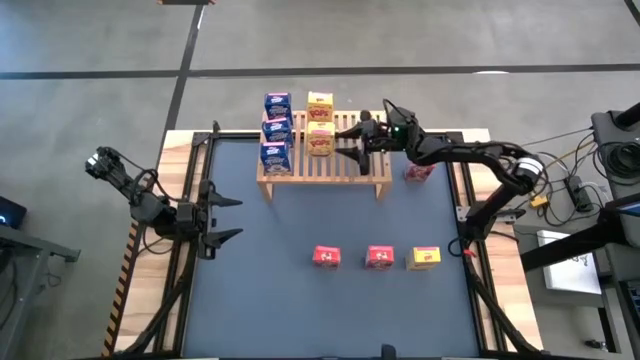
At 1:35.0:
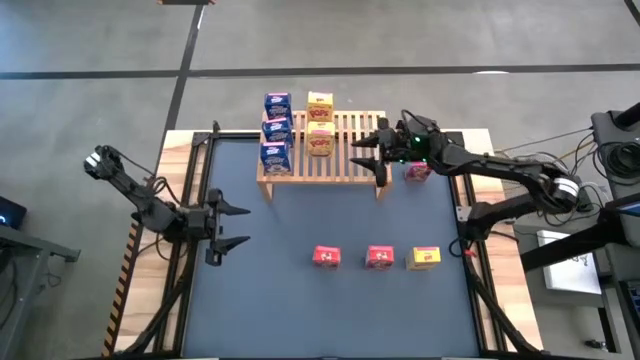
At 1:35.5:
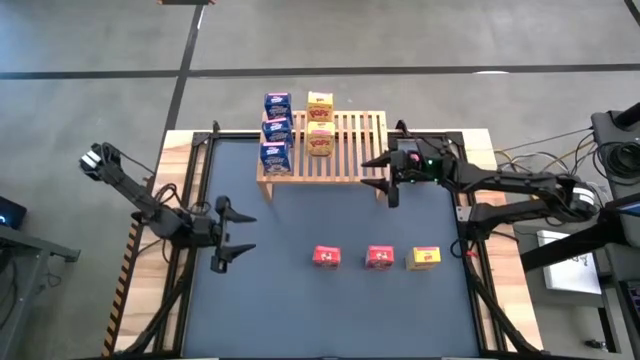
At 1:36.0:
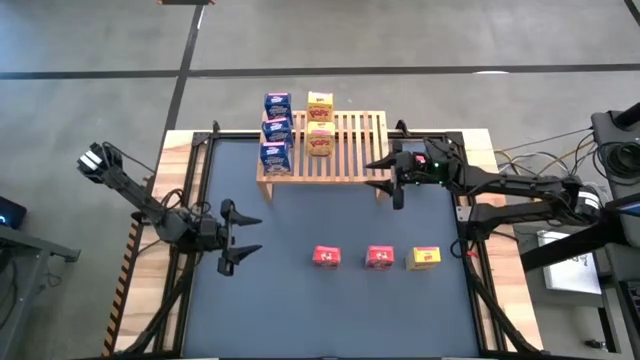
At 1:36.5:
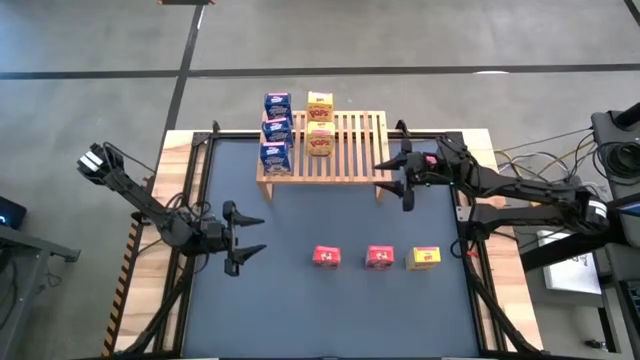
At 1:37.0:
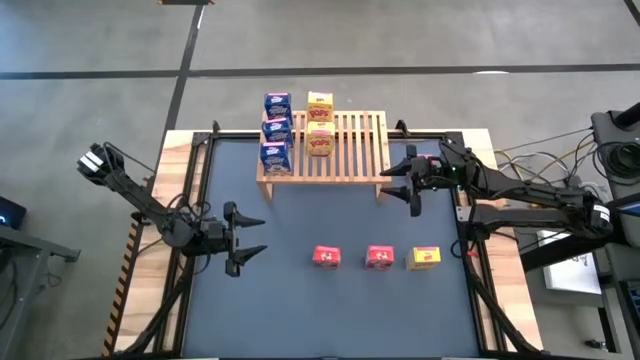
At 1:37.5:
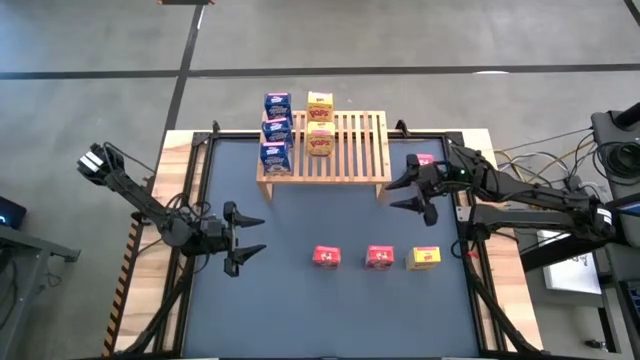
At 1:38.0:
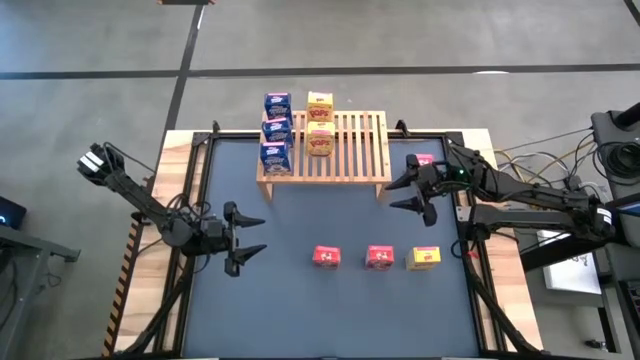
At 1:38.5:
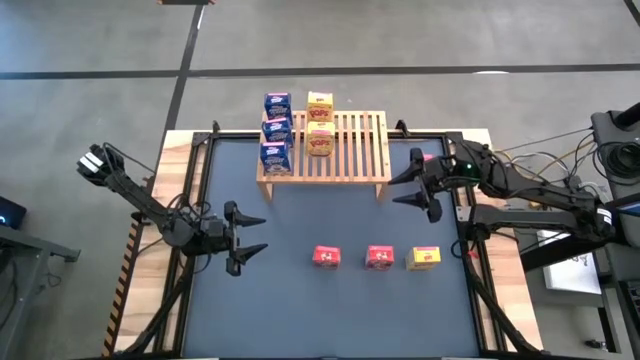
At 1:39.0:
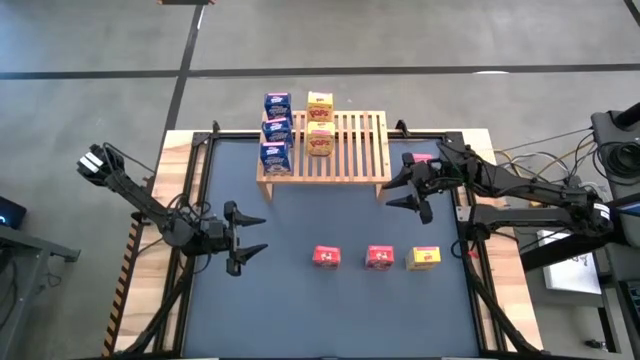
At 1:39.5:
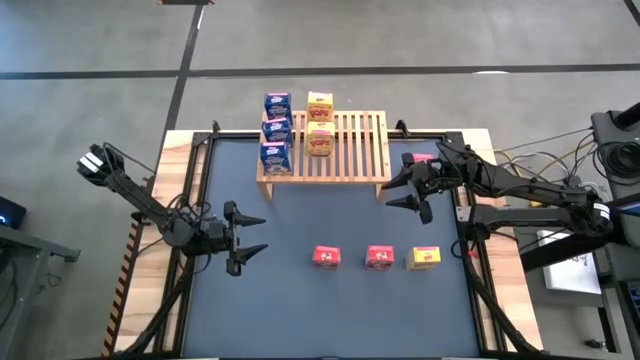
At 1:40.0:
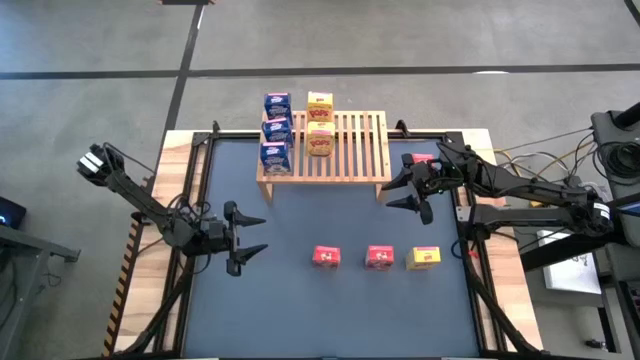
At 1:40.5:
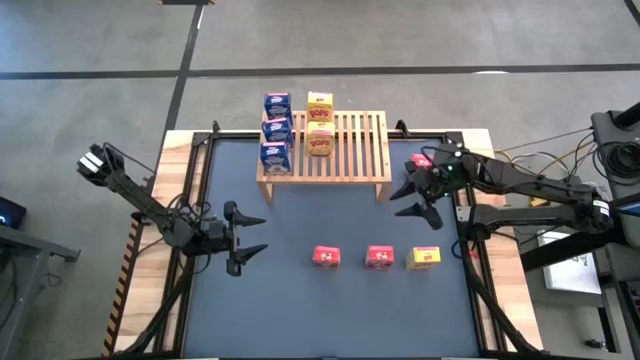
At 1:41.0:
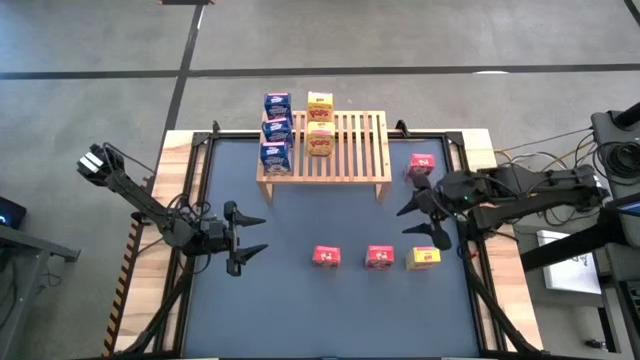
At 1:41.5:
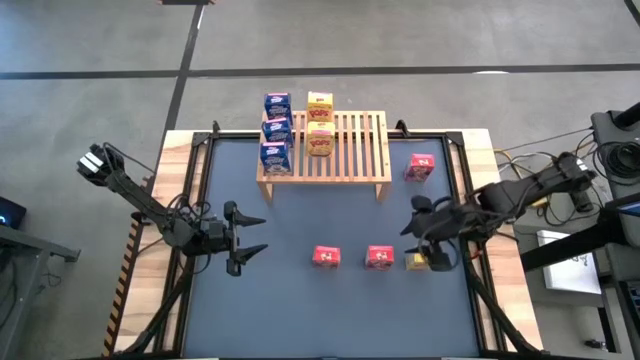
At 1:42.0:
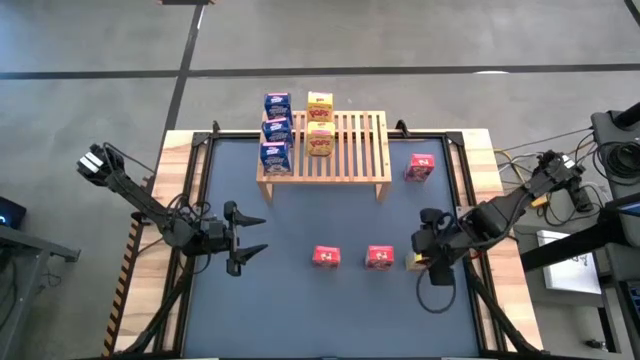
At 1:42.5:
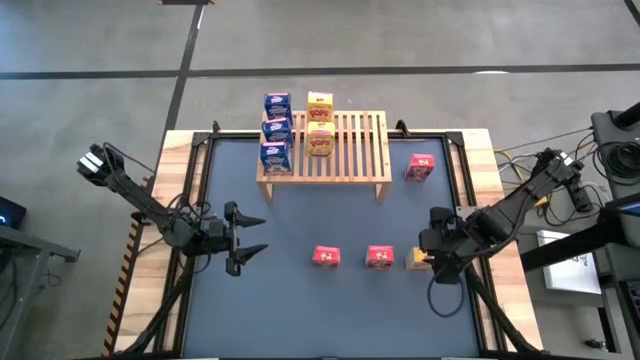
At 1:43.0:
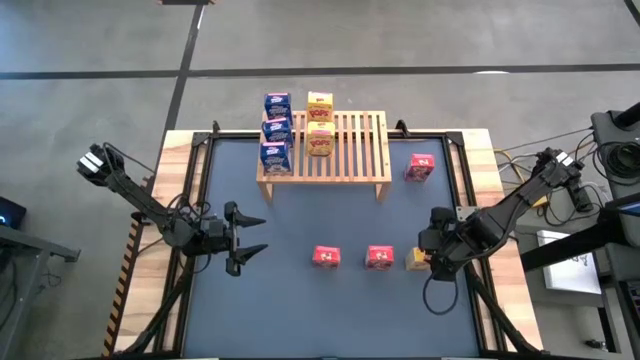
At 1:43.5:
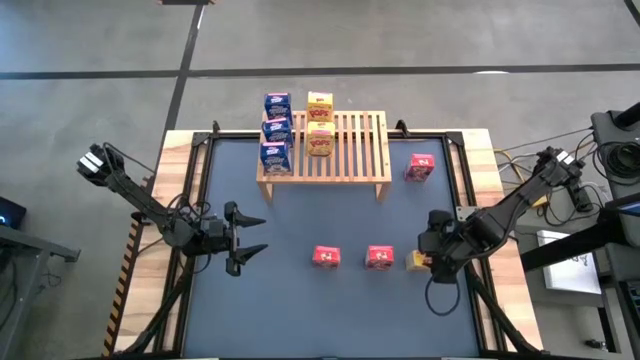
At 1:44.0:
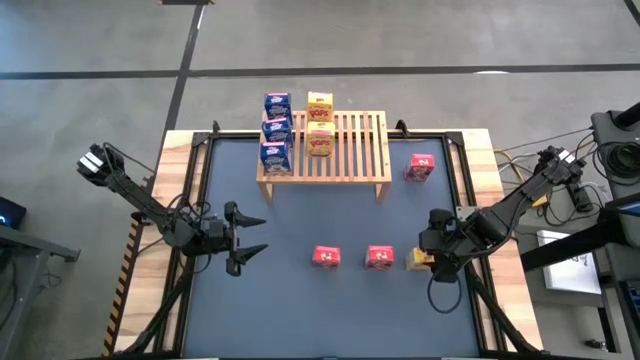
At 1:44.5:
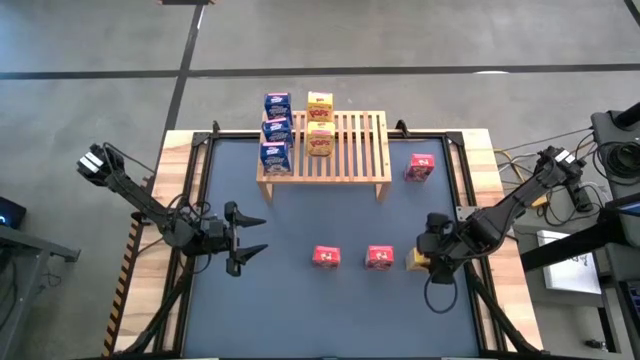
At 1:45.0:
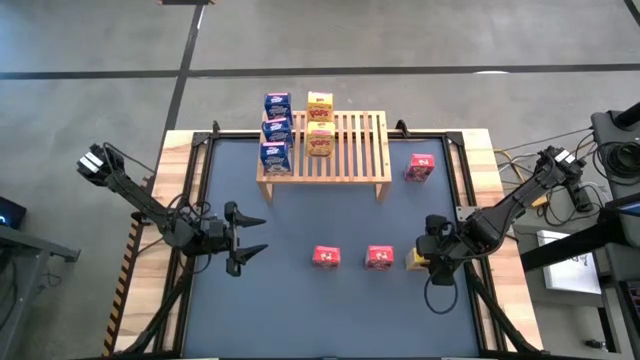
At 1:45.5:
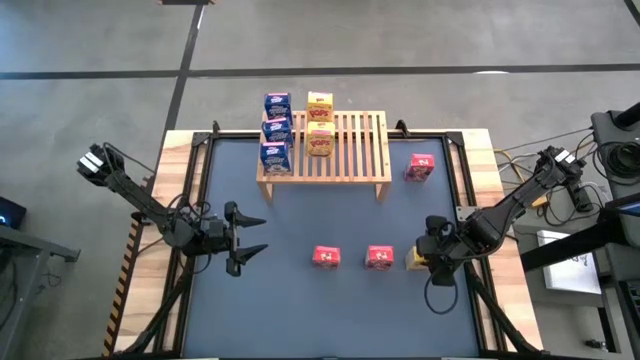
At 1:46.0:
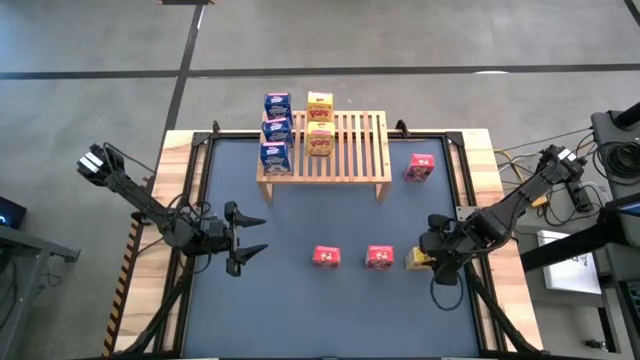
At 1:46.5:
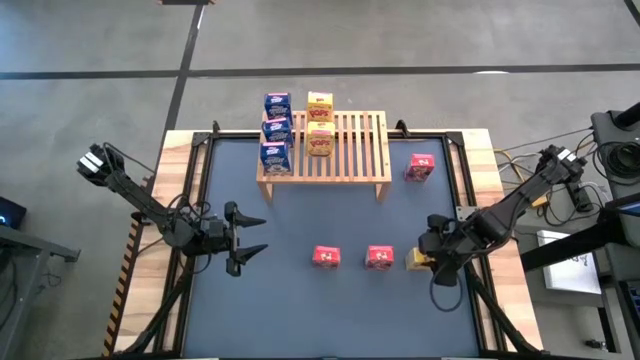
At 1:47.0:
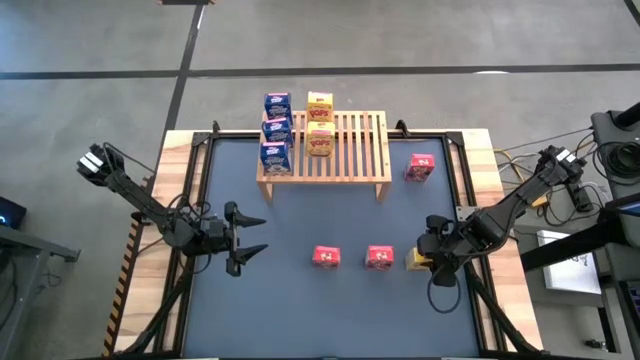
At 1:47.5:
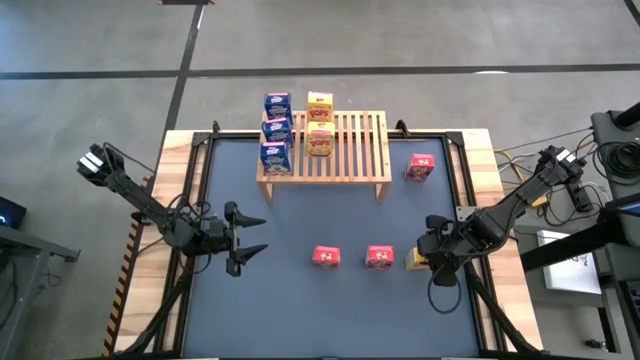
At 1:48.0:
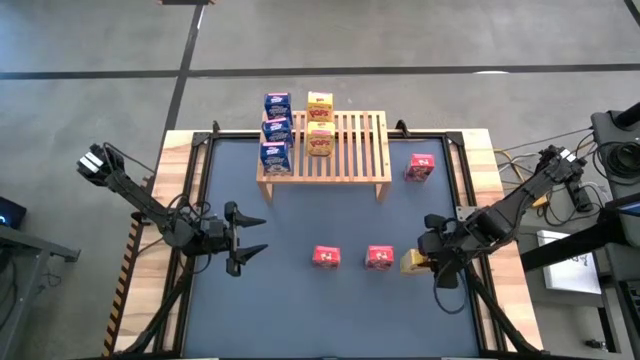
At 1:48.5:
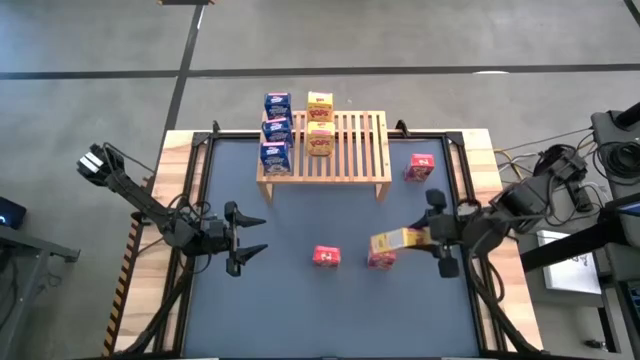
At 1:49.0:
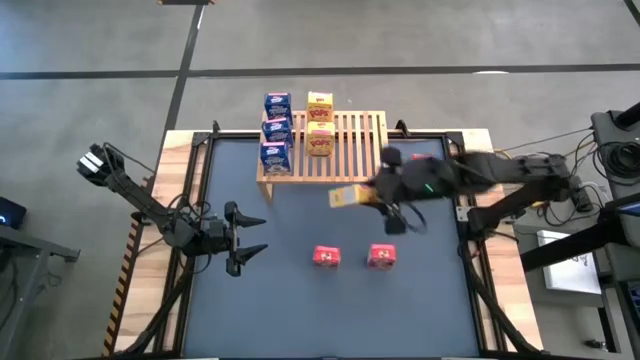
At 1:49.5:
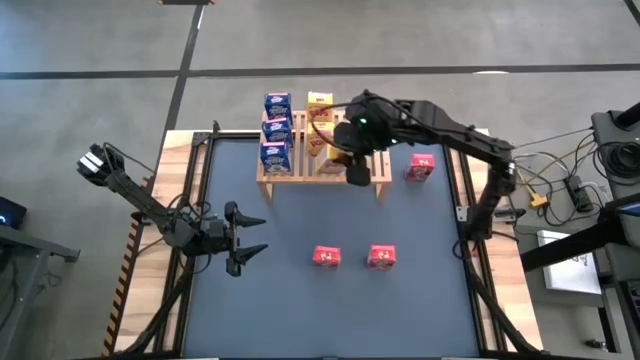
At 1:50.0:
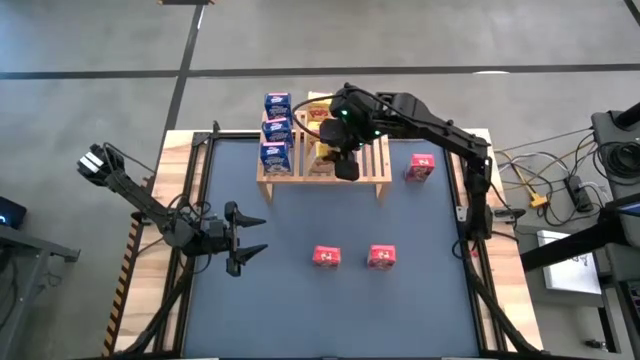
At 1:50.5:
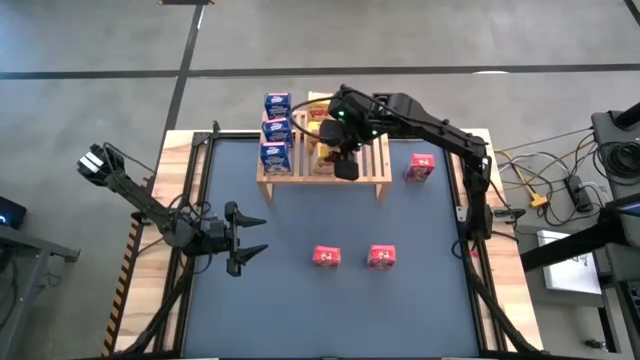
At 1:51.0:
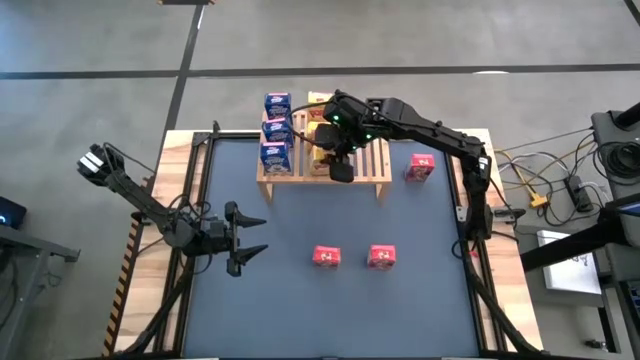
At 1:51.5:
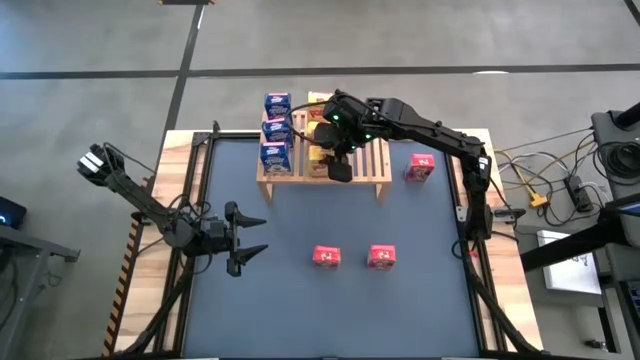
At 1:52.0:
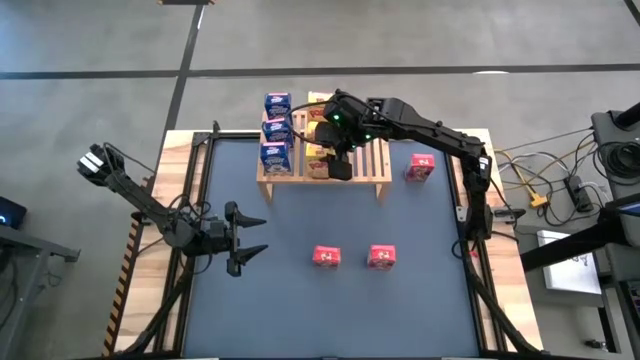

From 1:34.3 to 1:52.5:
Task: Stack cereal on shelf
Put the yellow cereal box on the shelf aligned with the other yellow cereal box

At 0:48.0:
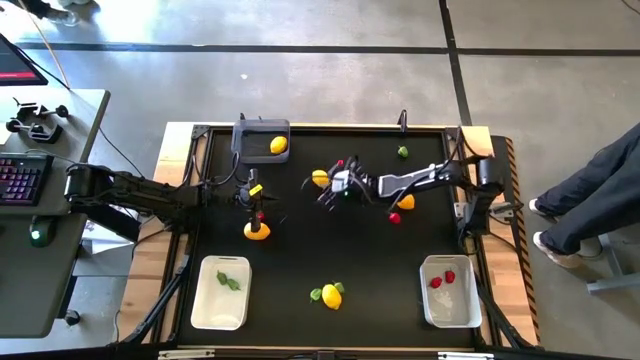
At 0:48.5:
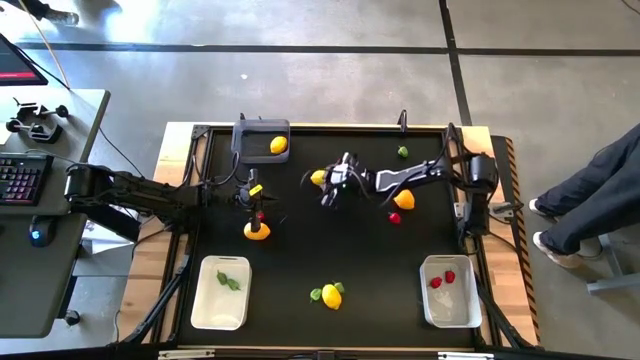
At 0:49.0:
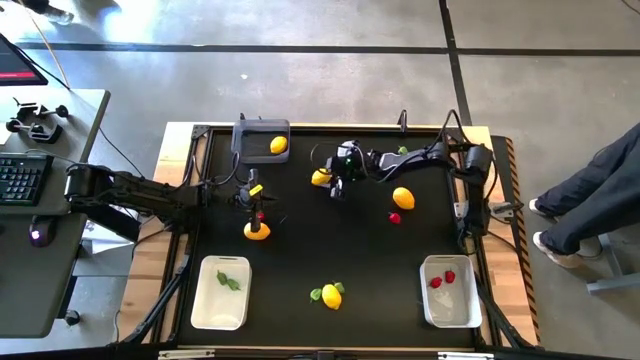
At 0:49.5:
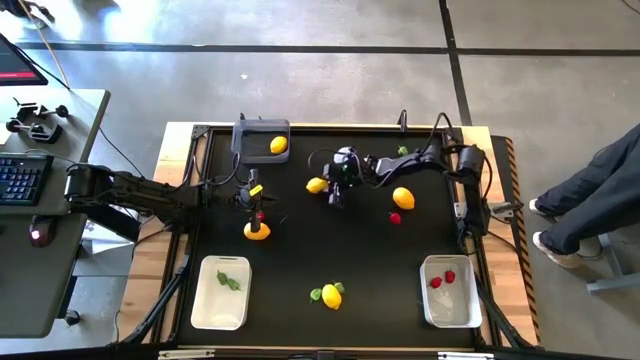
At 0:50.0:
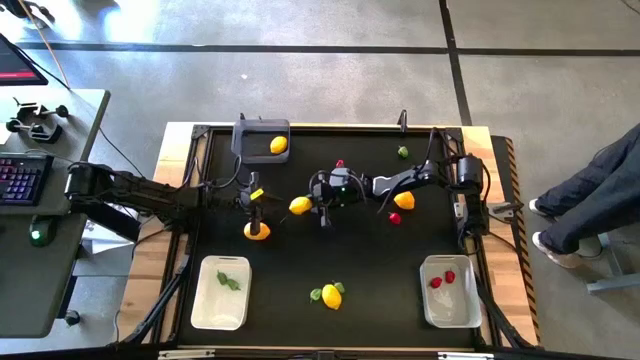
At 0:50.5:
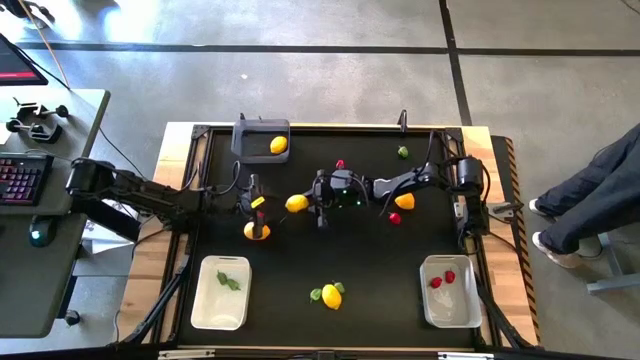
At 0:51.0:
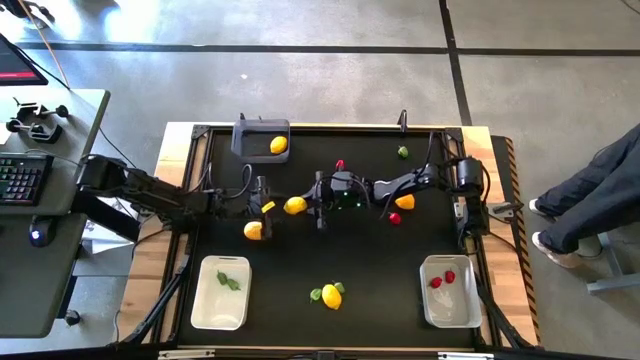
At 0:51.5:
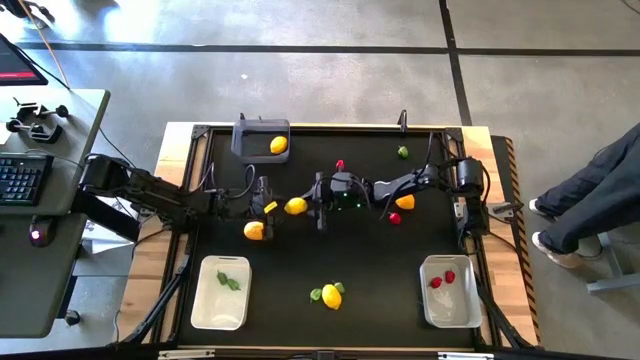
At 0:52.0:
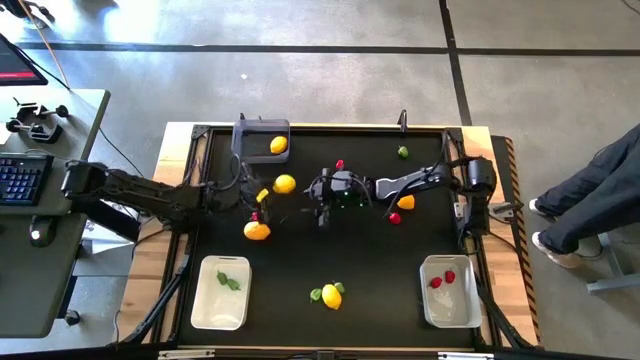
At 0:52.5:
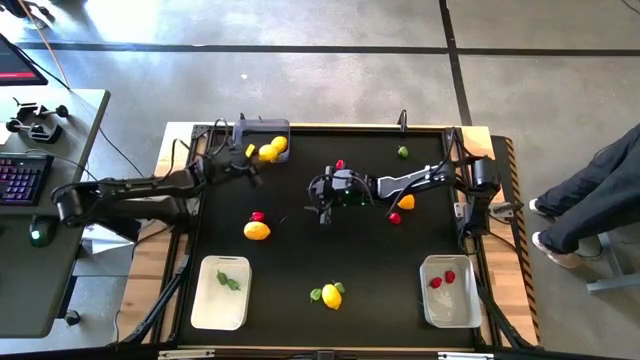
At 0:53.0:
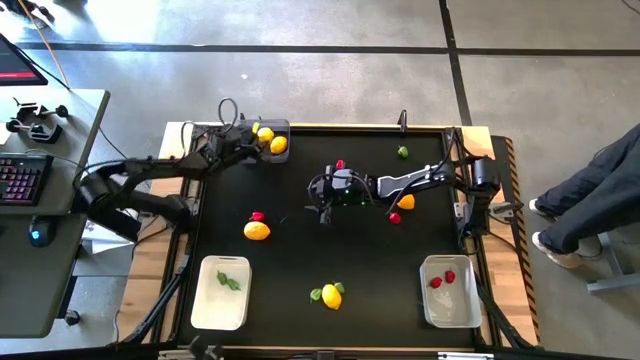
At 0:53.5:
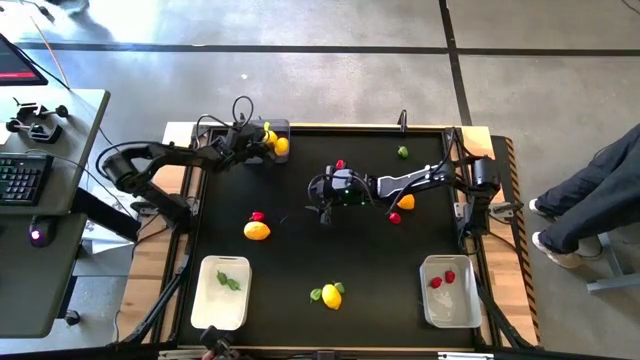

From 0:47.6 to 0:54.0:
Task: Sort produce into baskets
Put the yellow lemon into the black bin
